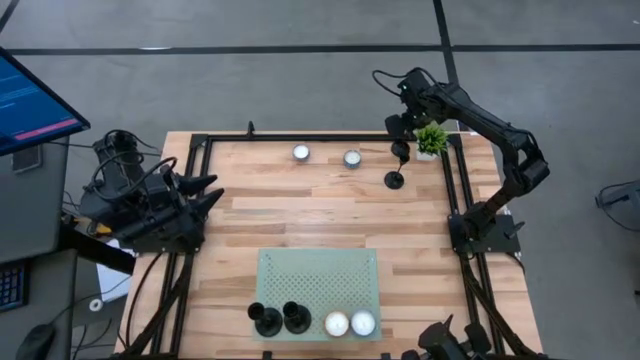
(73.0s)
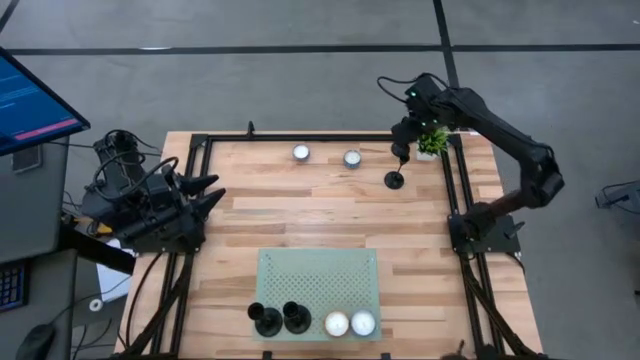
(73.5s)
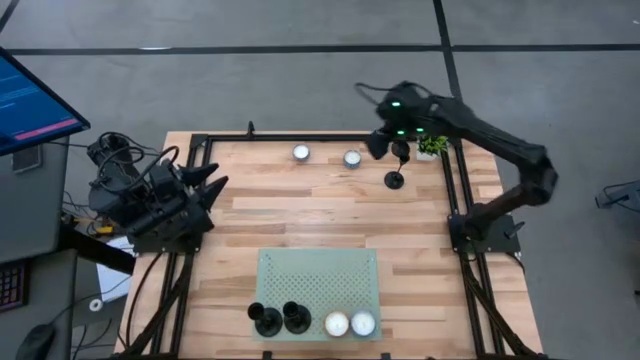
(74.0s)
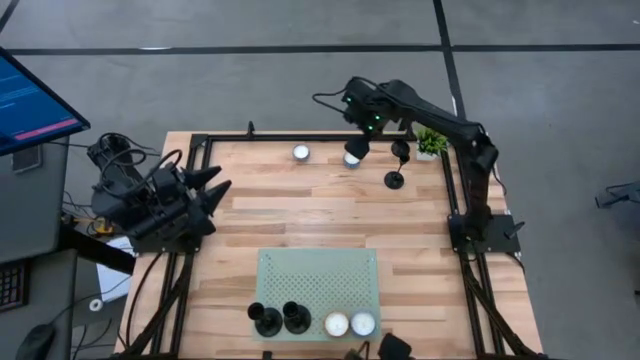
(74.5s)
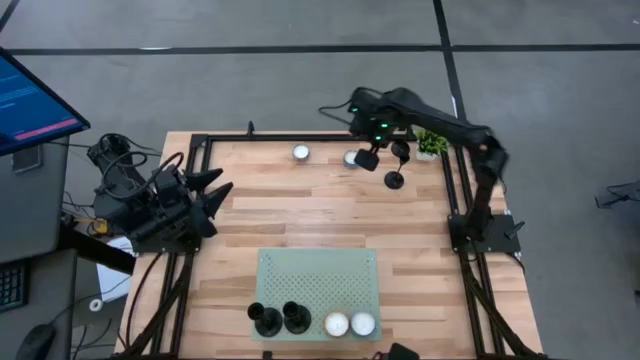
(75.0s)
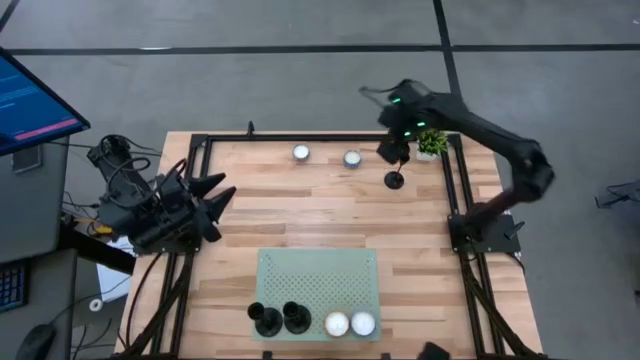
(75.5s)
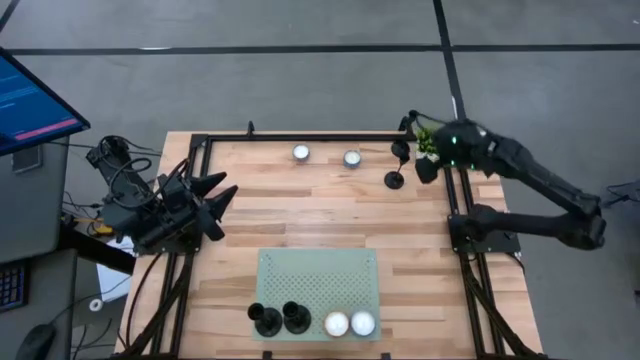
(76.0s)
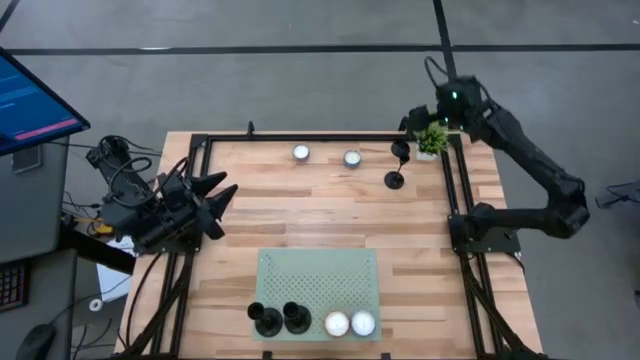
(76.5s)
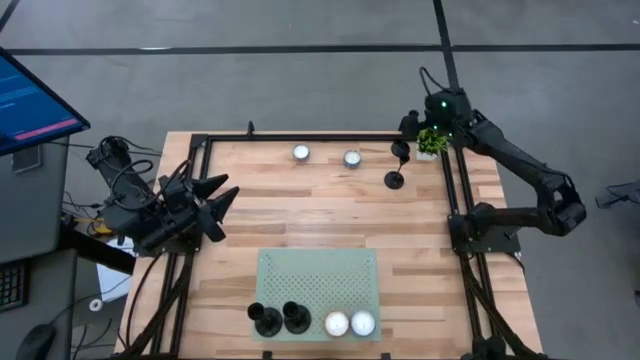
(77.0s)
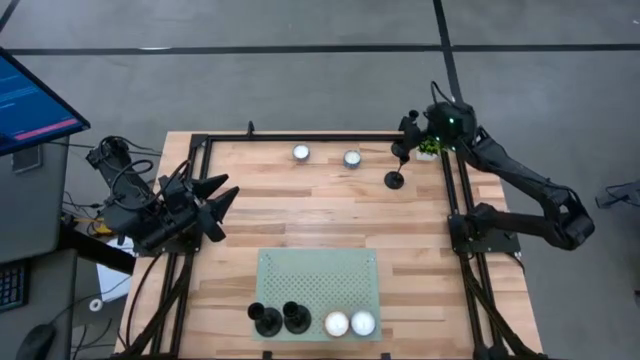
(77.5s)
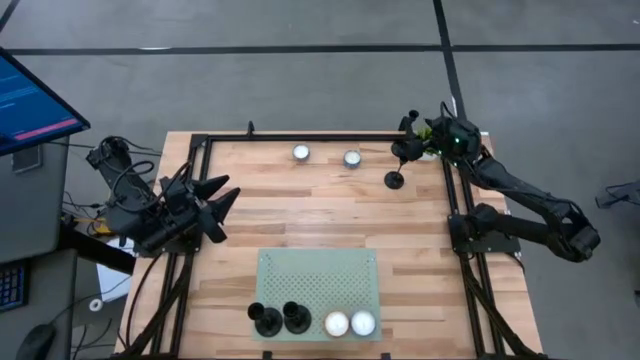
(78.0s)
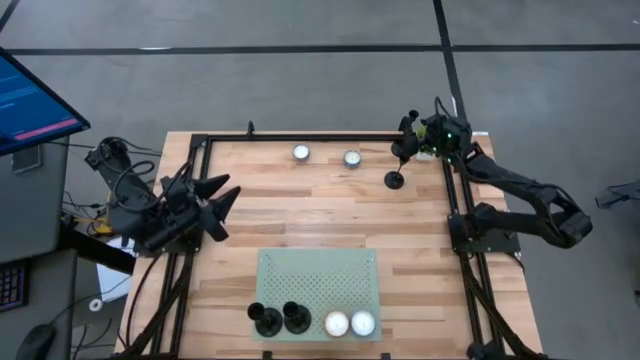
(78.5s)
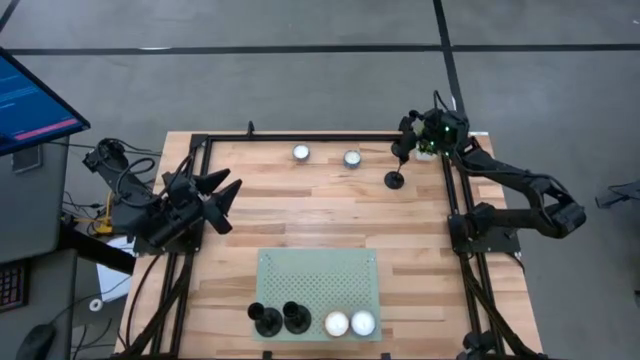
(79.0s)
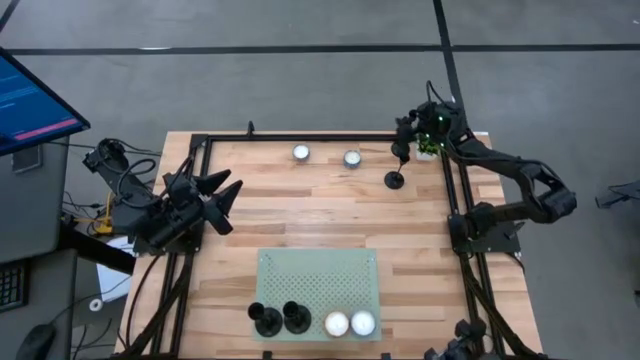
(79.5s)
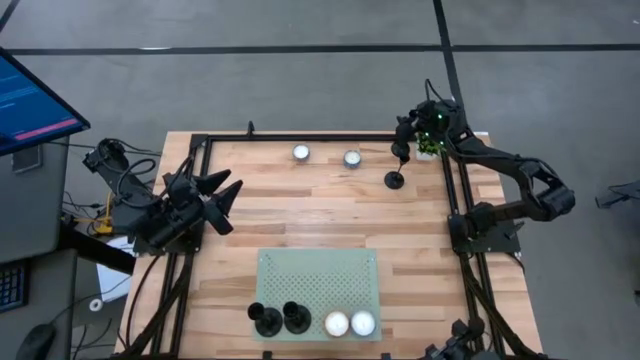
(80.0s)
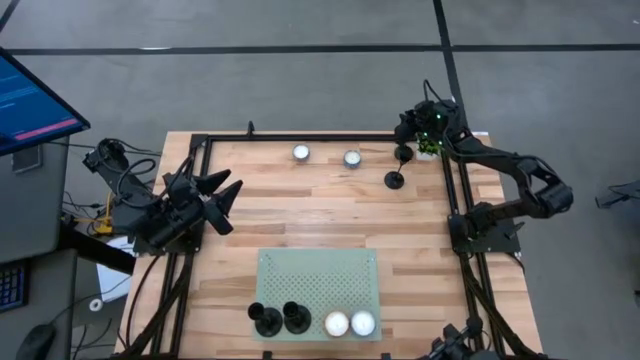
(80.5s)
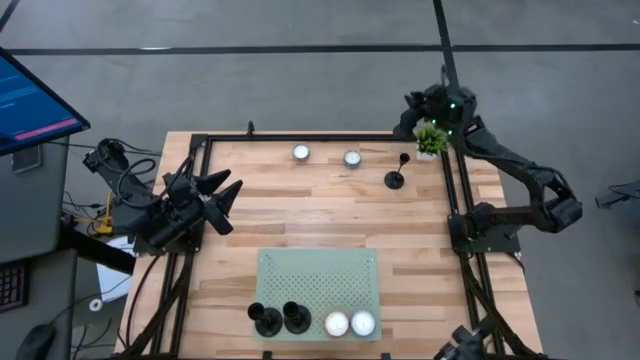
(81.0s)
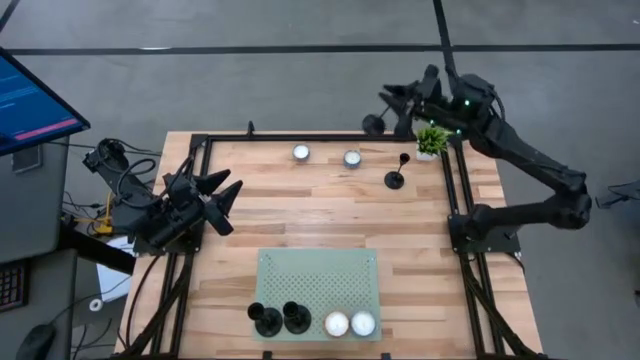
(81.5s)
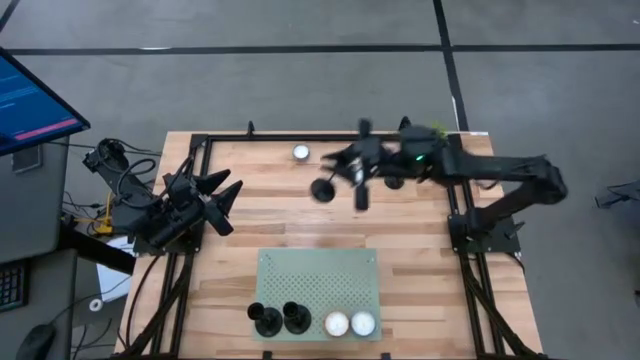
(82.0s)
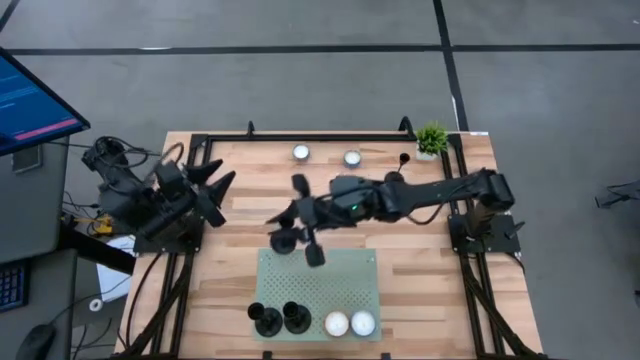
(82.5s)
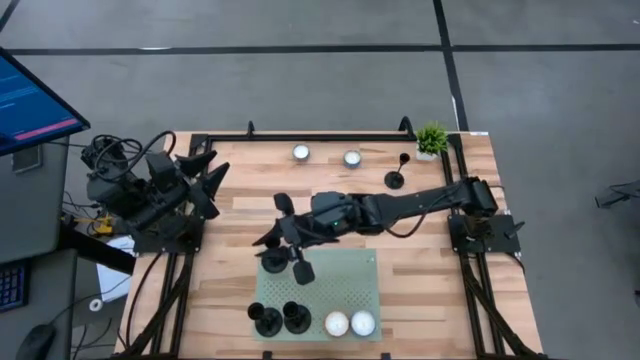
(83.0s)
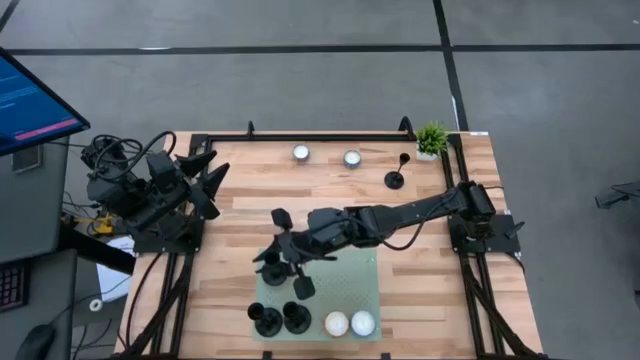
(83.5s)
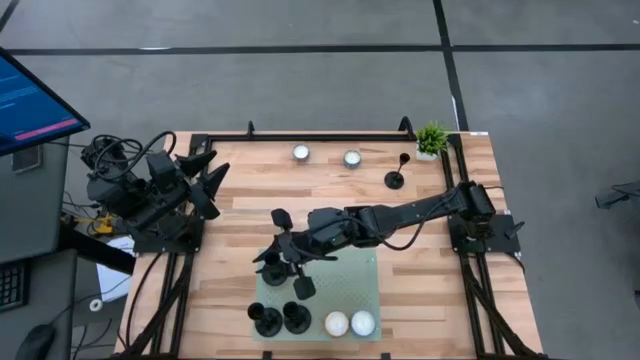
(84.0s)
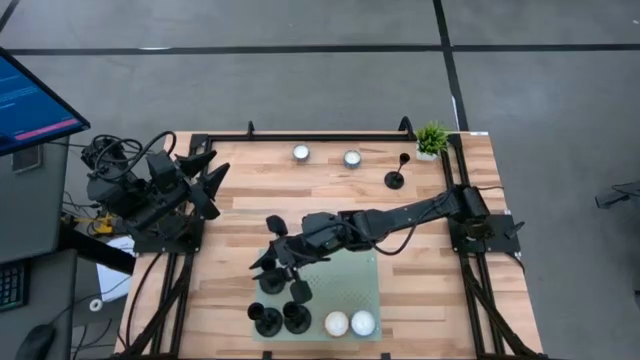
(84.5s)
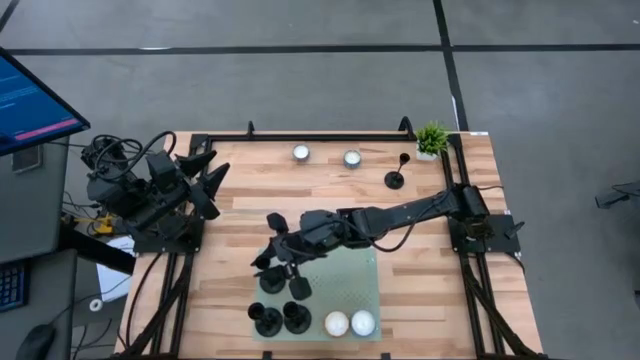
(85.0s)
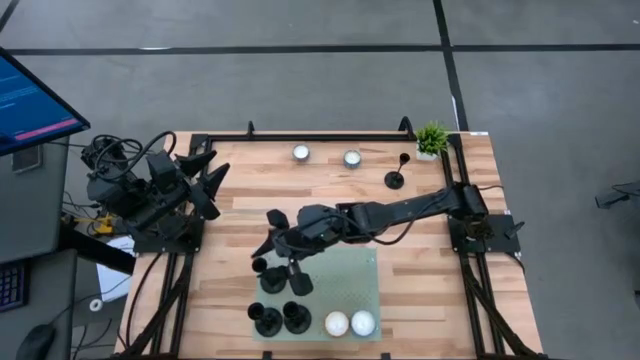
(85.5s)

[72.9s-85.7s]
Task: Stock candles on shelf
Put the black candle holder on the shelf

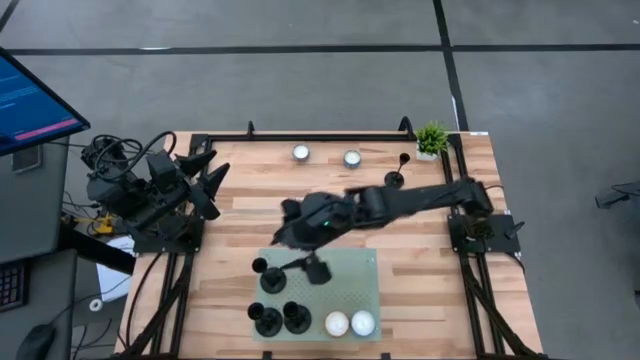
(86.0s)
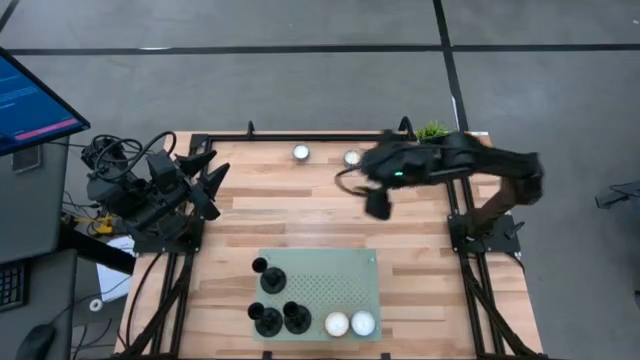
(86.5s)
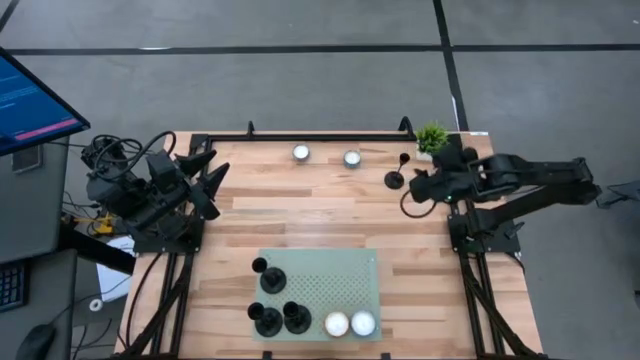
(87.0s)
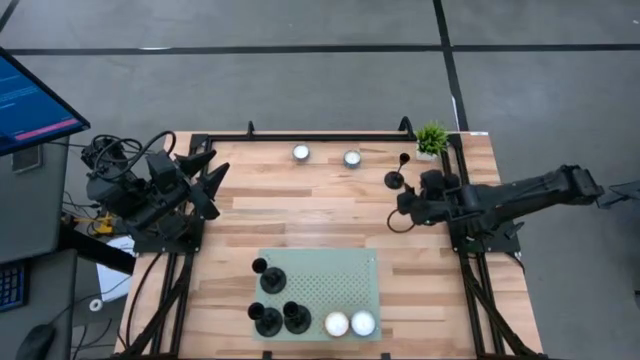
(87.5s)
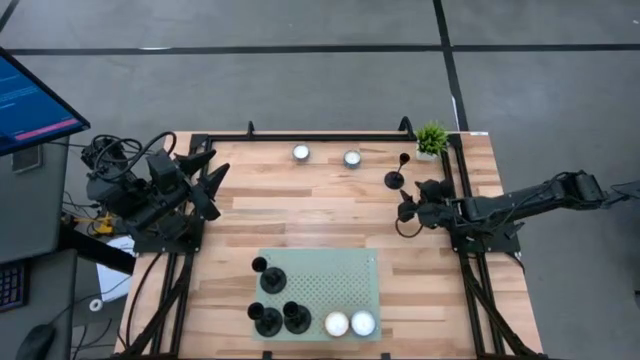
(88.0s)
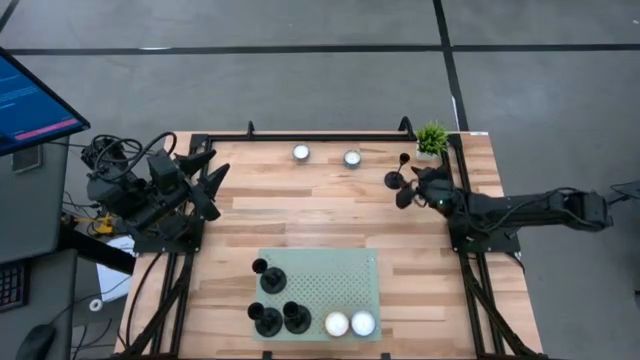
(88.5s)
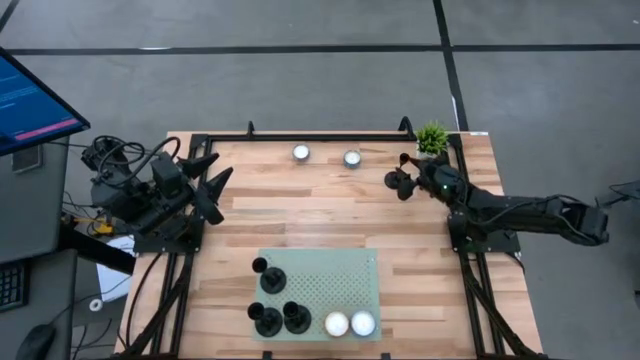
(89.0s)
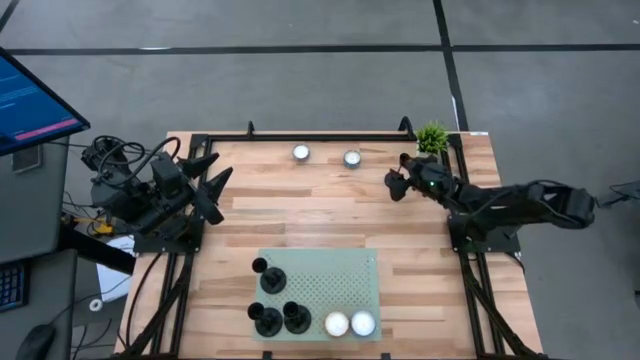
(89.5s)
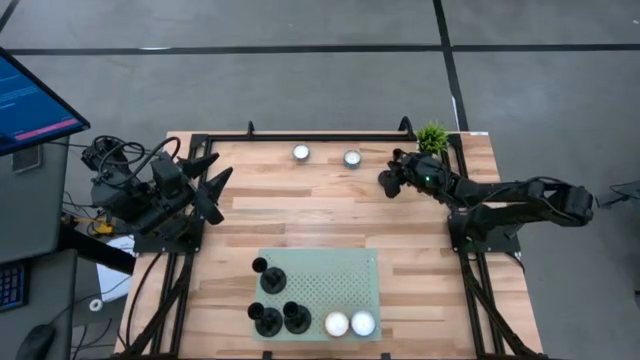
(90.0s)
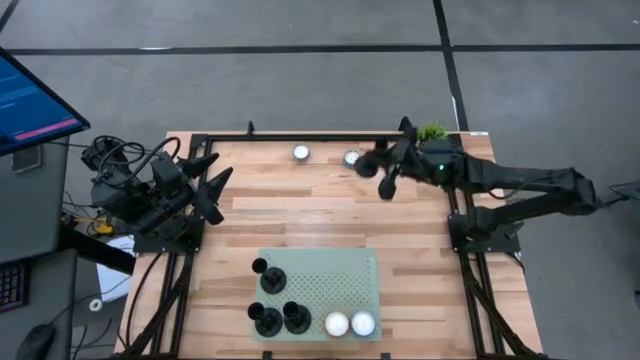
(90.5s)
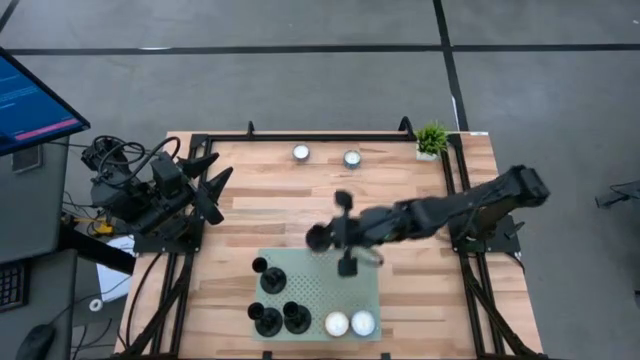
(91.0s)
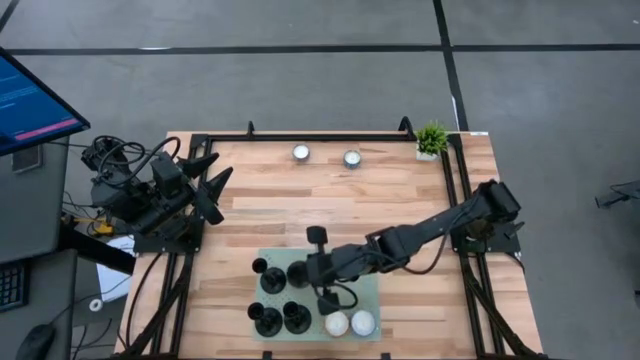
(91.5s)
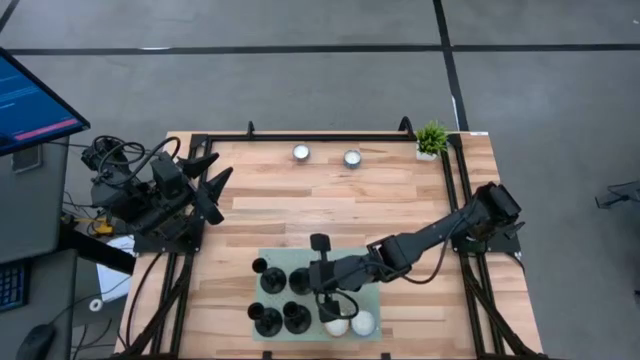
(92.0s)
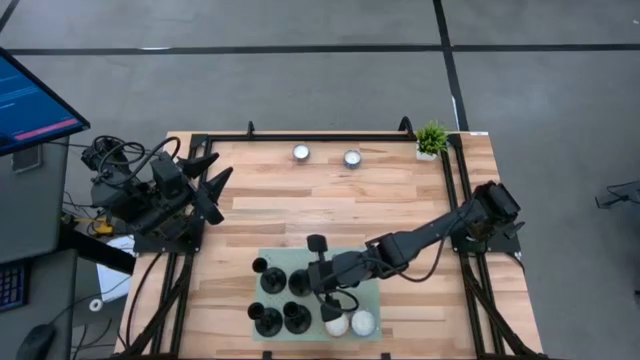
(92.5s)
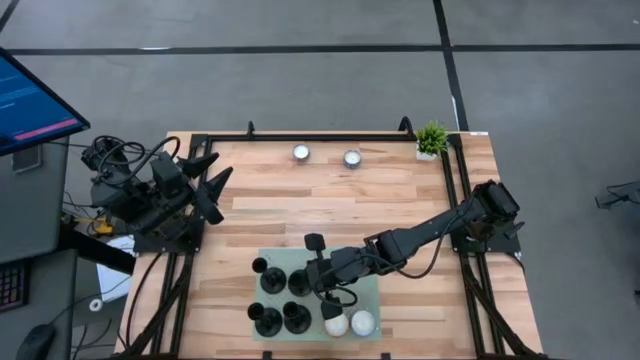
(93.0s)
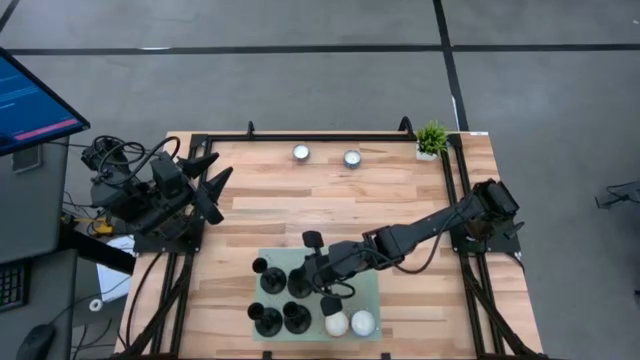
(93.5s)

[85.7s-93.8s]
Put the black candle holder on the shelf

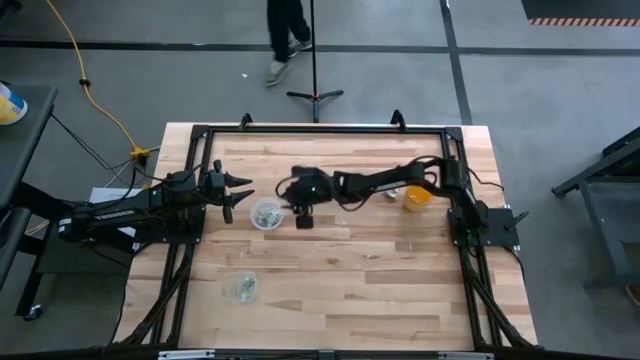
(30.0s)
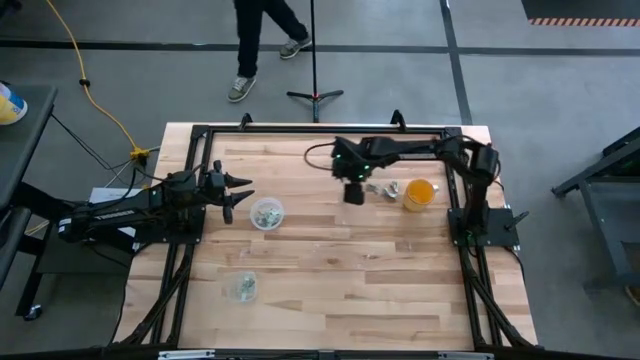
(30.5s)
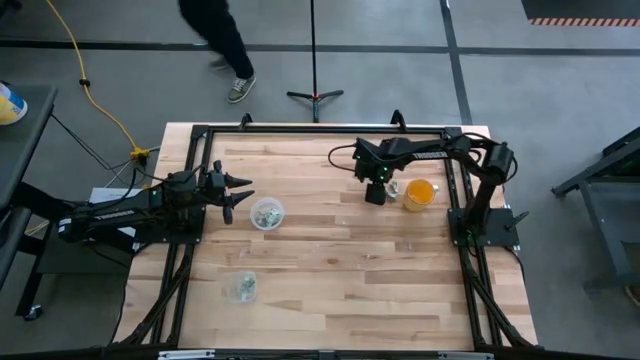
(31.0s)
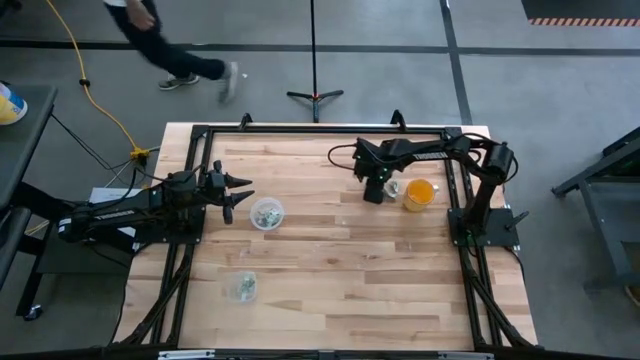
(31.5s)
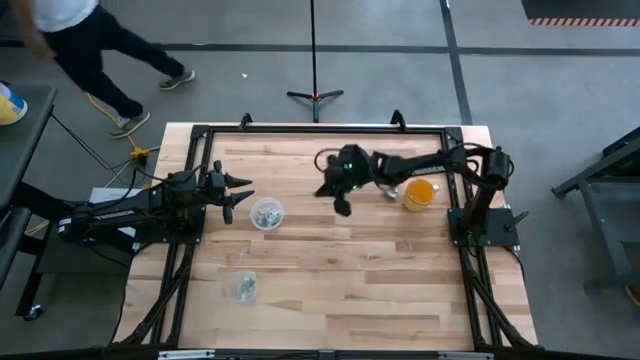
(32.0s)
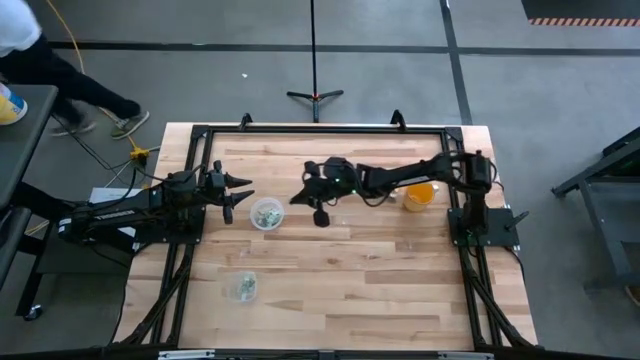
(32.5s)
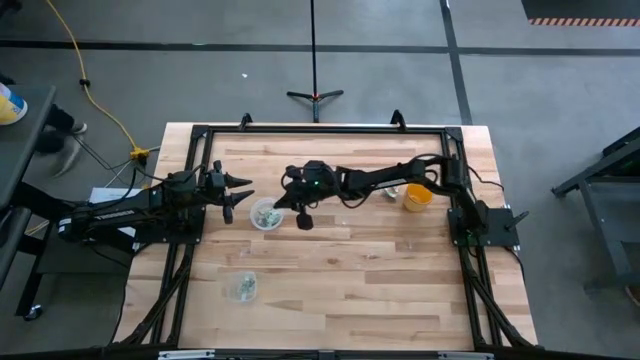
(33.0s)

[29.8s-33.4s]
Task: Pick and place Stevia / Truvia into bins
Put the stevia packet in the top transparent container
